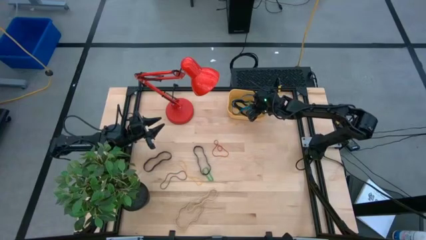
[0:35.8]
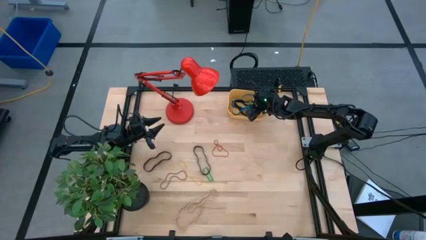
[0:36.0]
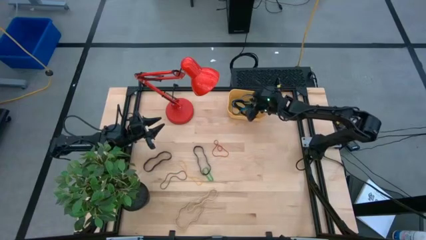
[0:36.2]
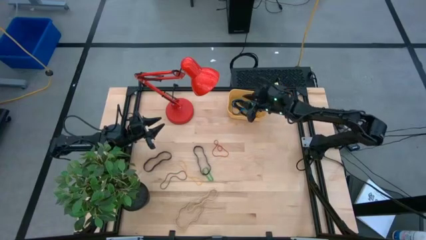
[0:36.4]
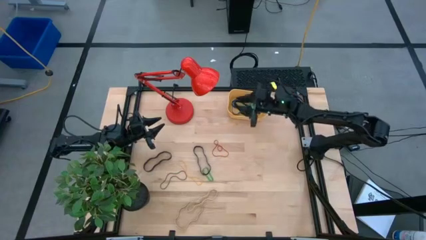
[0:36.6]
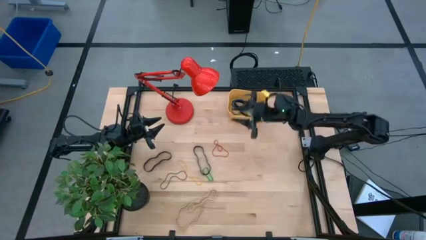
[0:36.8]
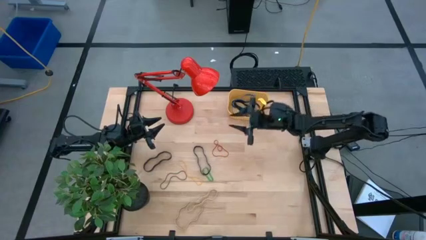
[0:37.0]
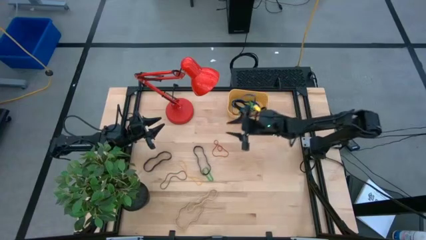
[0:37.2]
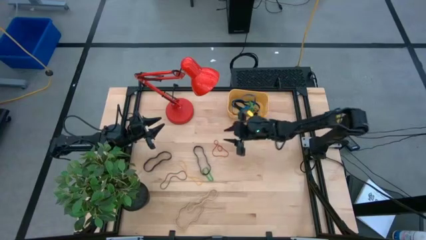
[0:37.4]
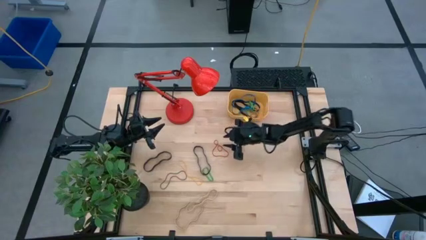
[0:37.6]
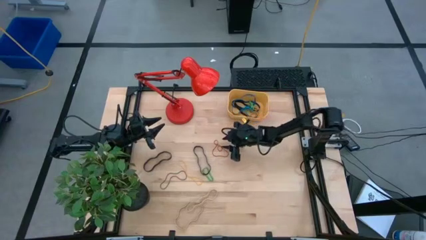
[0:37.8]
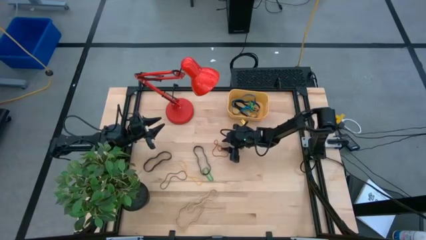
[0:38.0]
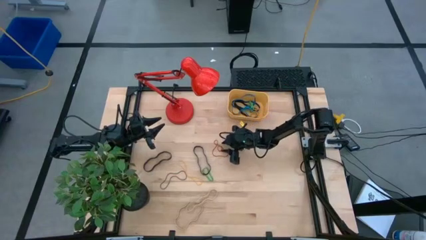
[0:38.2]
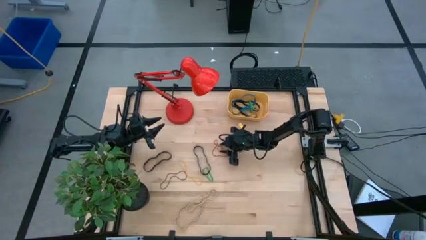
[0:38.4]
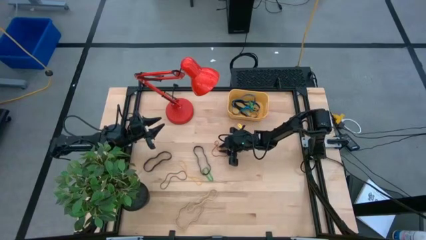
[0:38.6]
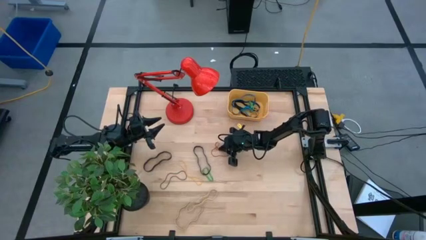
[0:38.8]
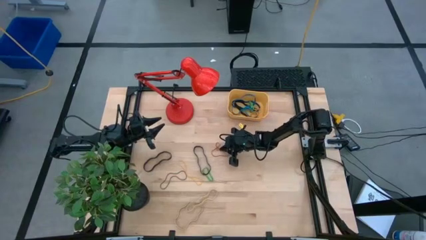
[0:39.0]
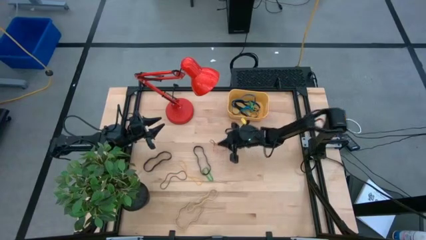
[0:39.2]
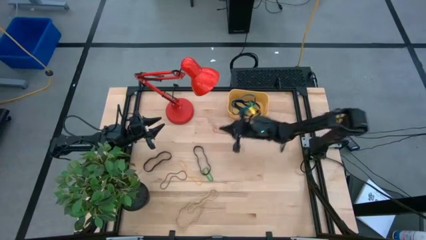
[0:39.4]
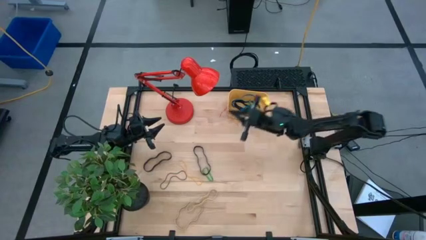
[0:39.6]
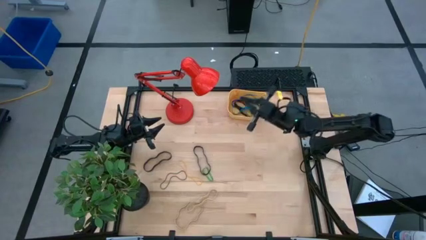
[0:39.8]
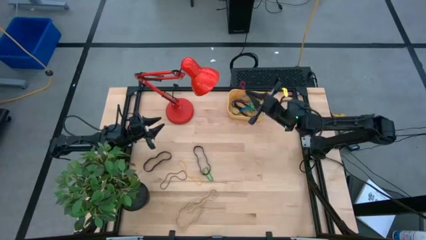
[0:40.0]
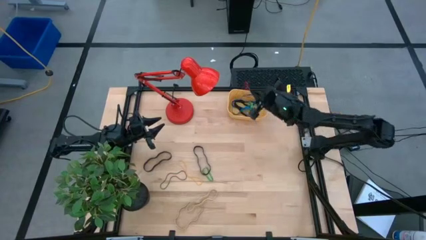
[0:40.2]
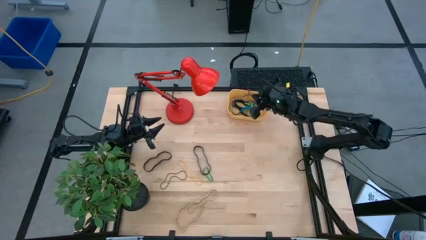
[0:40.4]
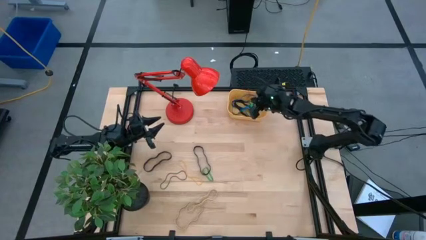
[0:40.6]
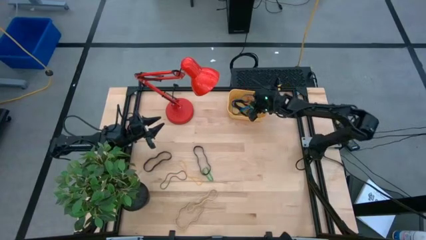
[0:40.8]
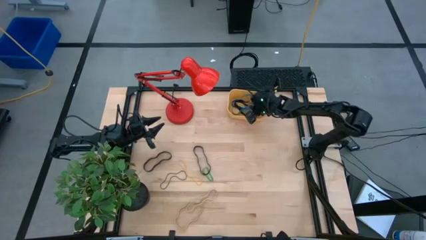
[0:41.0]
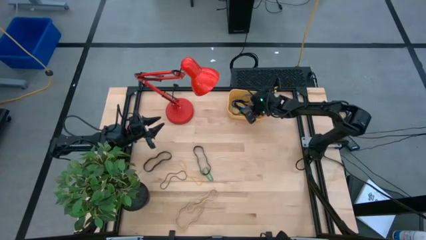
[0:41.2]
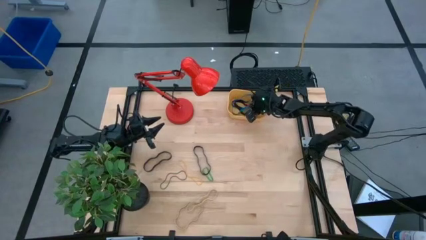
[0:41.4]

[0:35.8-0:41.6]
Task: Pick and place rubber bands into bin
Put the red rubber band into the yellow container

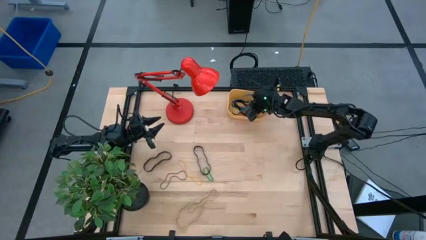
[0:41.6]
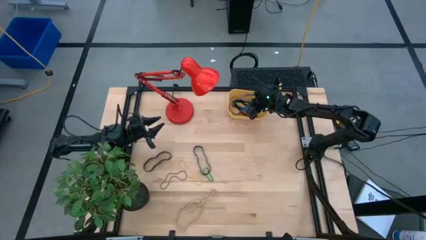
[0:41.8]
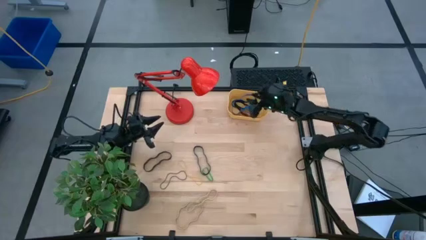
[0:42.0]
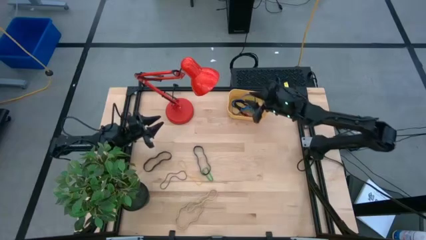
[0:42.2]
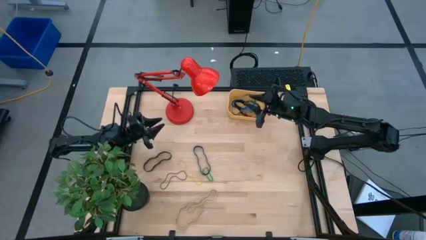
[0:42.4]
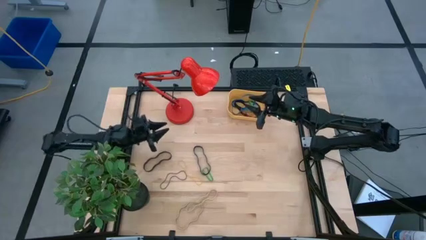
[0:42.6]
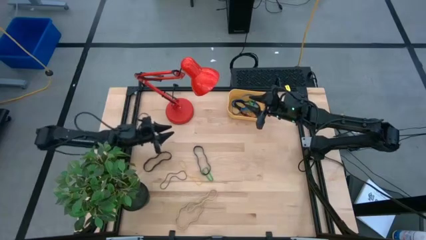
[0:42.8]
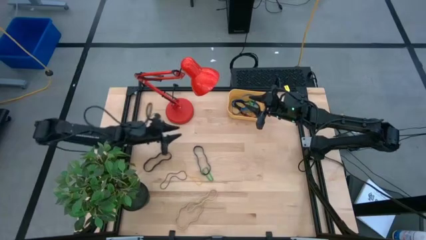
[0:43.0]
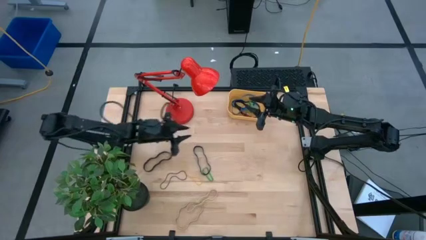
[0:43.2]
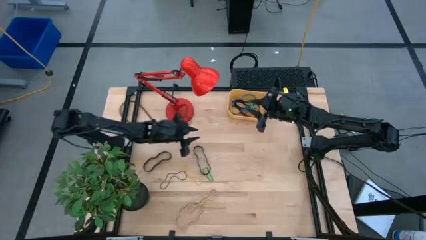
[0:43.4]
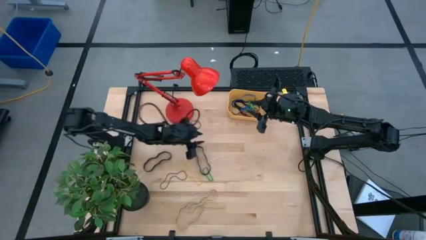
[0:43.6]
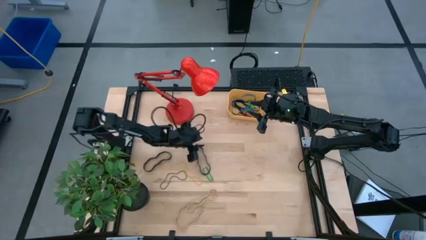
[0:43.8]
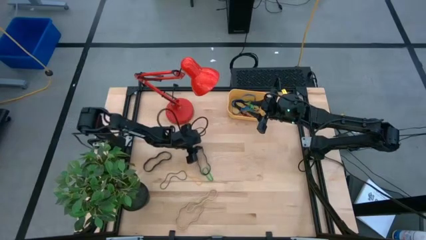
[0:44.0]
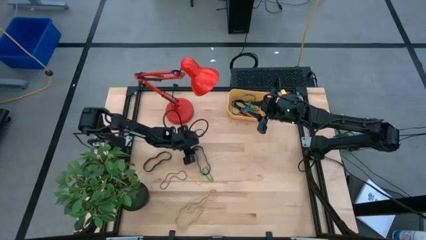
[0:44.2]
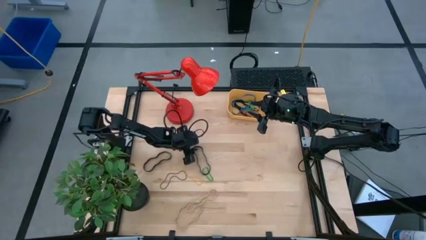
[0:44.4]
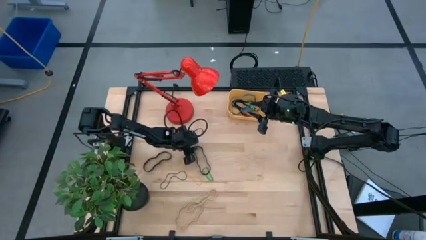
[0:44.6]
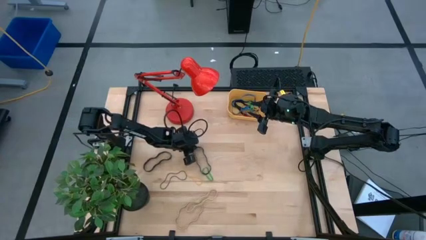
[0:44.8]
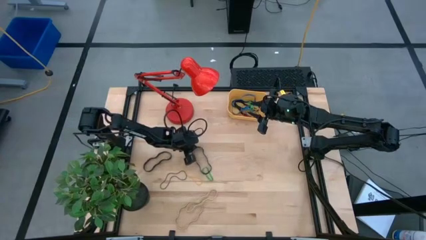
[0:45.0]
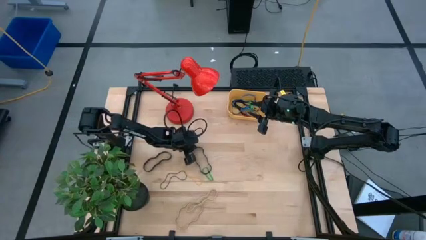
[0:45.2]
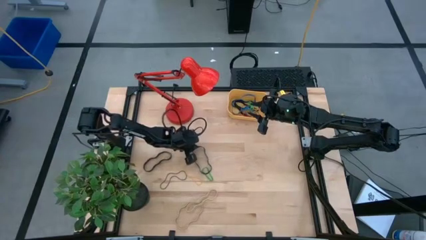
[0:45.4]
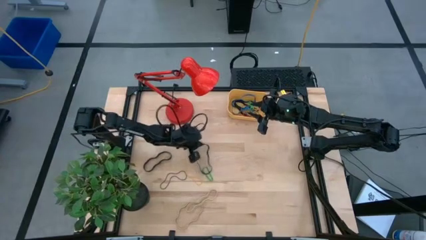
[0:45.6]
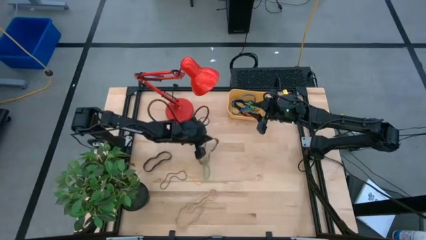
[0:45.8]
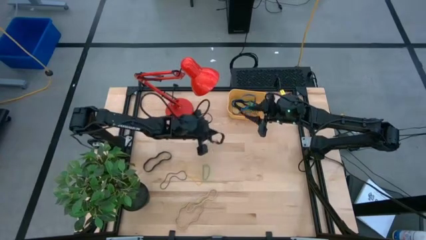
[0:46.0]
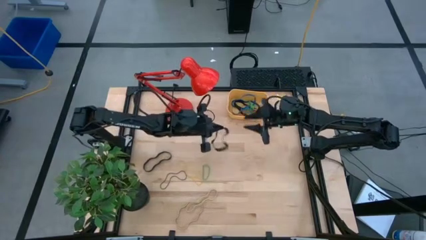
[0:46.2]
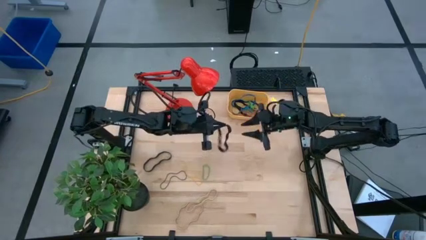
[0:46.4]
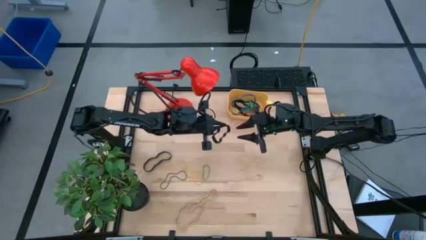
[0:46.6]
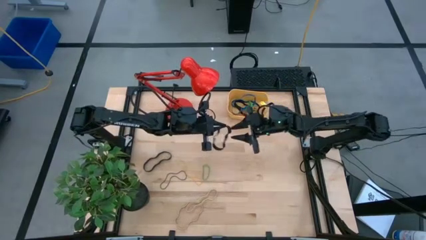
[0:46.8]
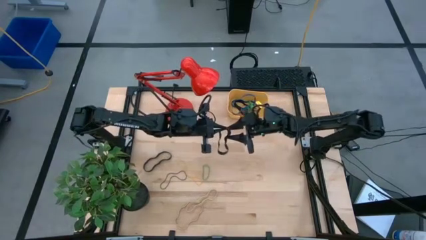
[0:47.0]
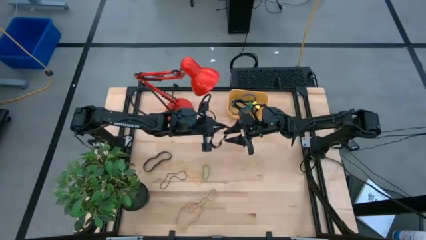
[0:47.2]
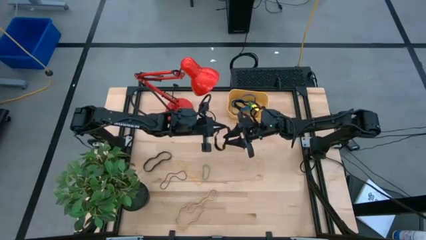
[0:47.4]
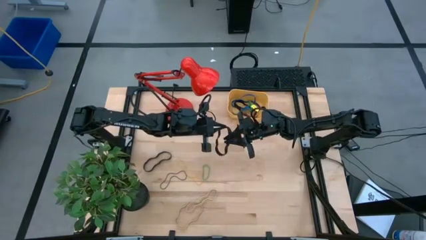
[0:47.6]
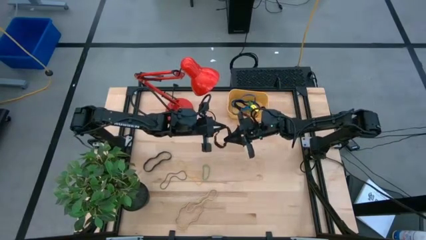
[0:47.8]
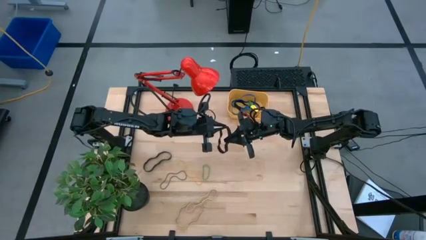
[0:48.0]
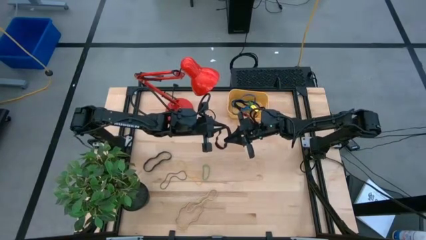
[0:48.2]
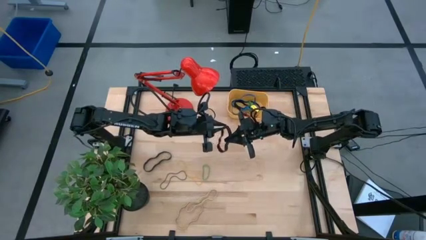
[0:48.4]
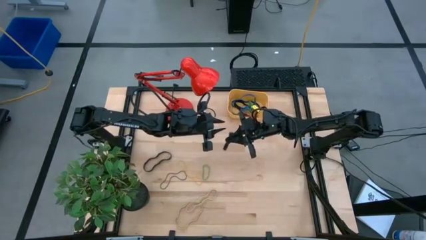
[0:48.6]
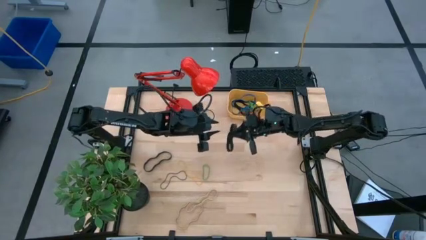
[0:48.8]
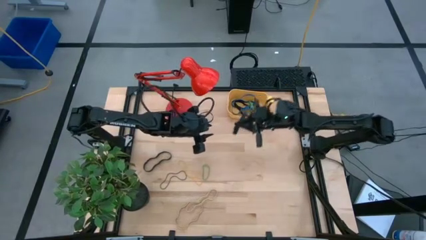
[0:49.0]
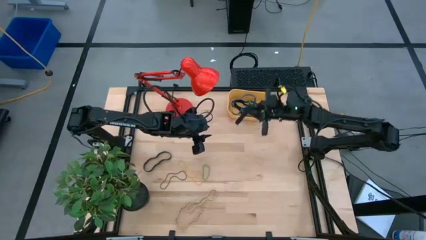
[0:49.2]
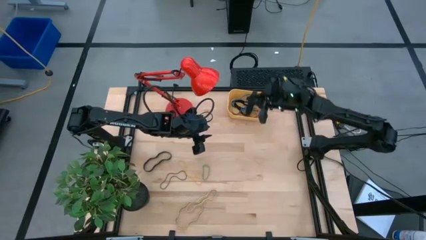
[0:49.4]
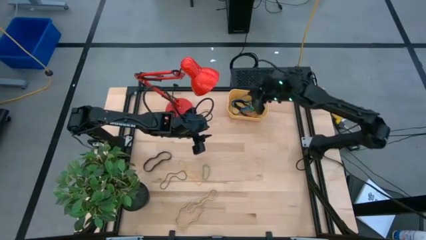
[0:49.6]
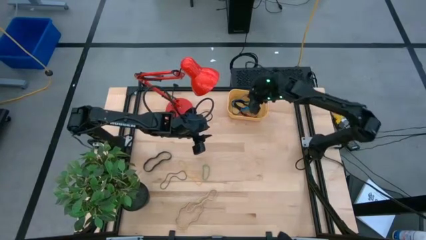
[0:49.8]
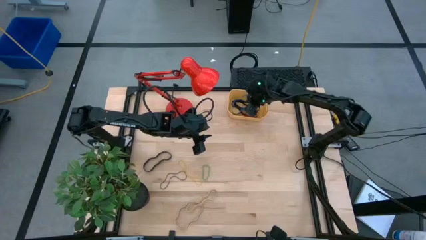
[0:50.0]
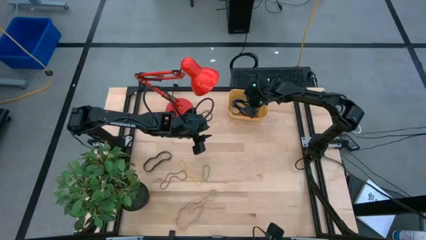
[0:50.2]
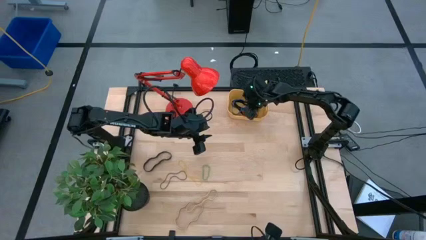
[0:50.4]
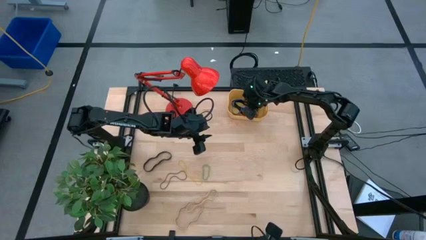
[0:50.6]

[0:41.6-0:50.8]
Put the right black rubber band into the yellow container

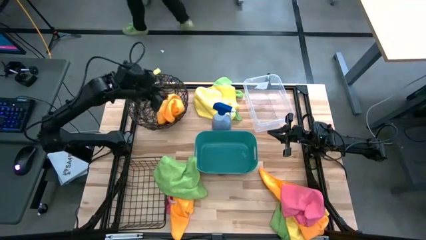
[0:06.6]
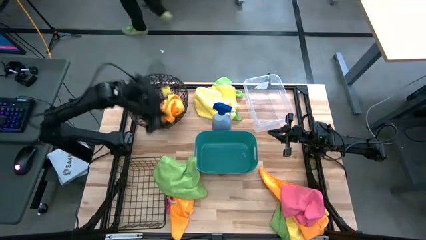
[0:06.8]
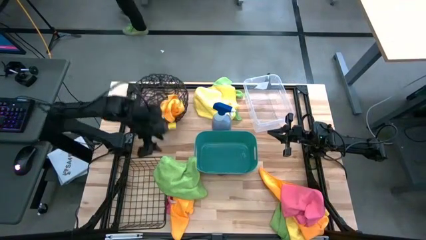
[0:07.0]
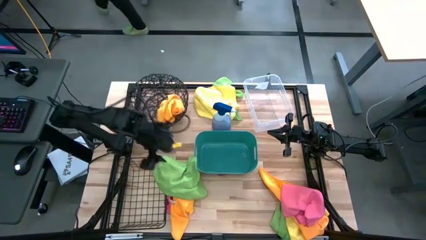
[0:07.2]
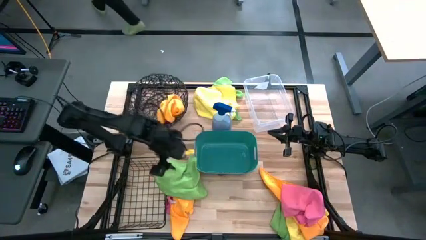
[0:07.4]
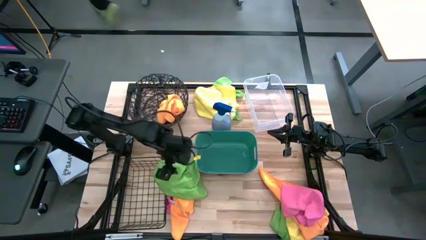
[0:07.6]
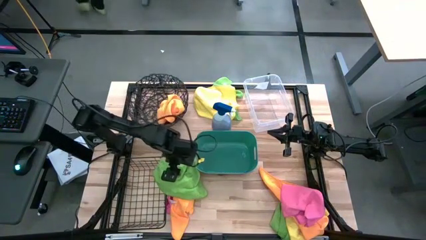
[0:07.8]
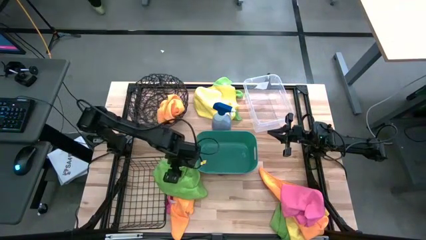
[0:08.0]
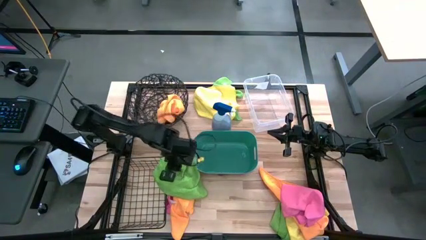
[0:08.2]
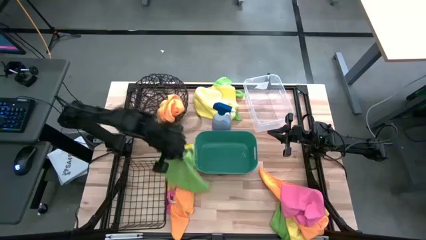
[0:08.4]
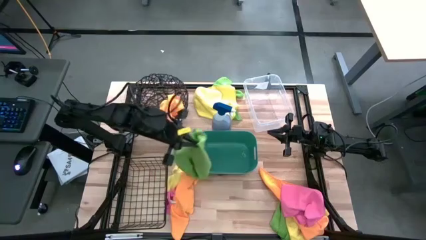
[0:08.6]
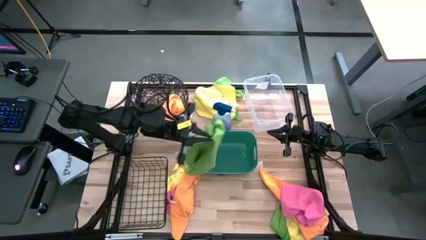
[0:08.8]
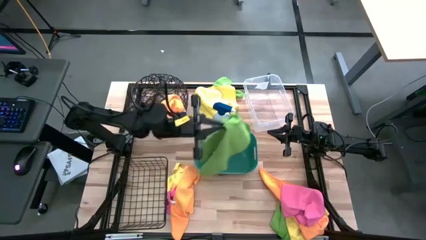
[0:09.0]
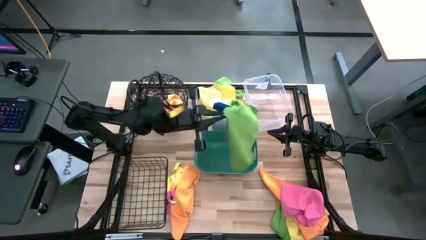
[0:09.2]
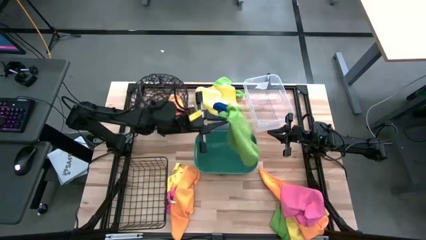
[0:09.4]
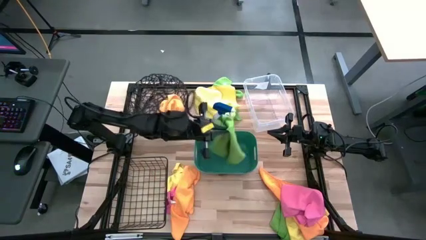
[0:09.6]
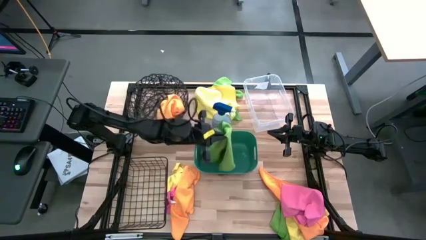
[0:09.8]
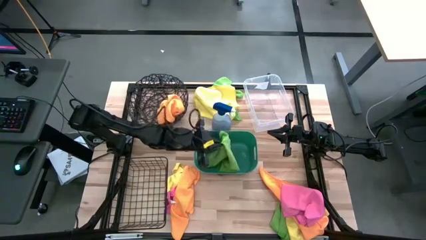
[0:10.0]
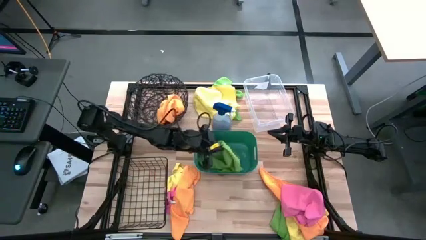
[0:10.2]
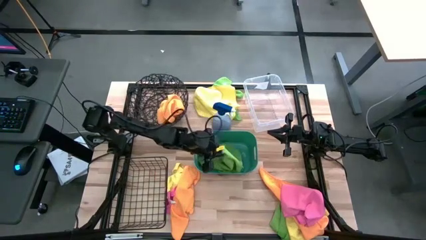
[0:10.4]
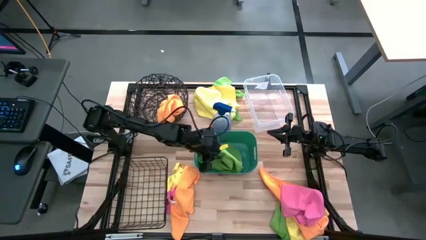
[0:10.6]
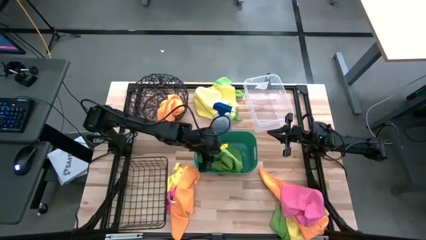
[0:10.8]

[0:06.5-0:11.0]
Task: Sort microfiber towel by color & place in baskets
Put the green towel into the green bin
